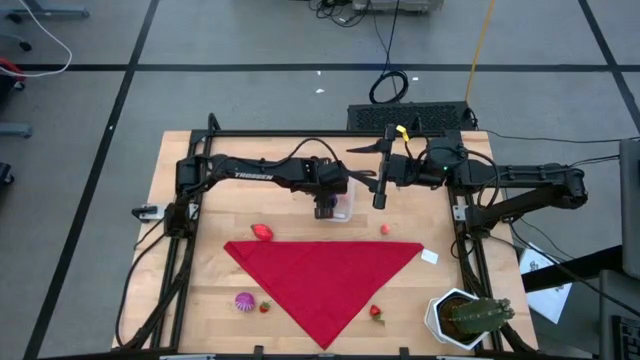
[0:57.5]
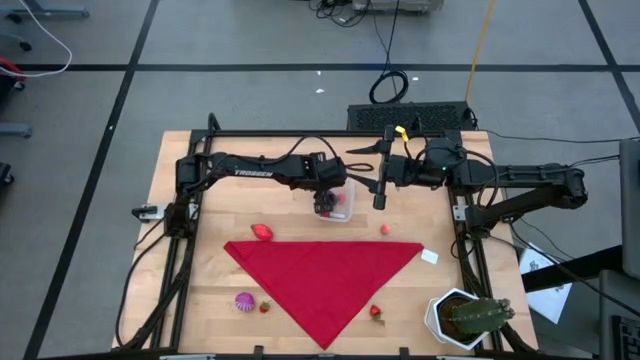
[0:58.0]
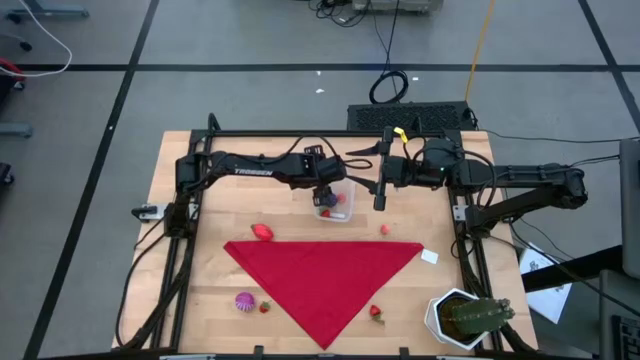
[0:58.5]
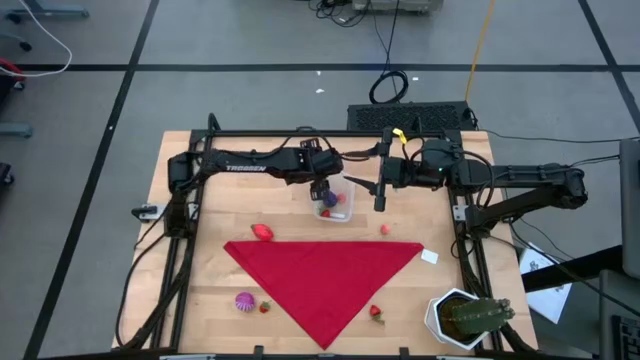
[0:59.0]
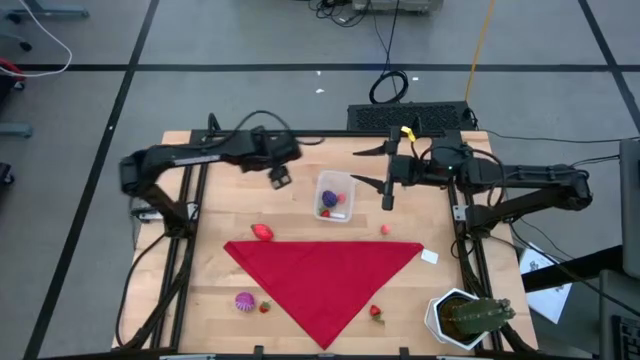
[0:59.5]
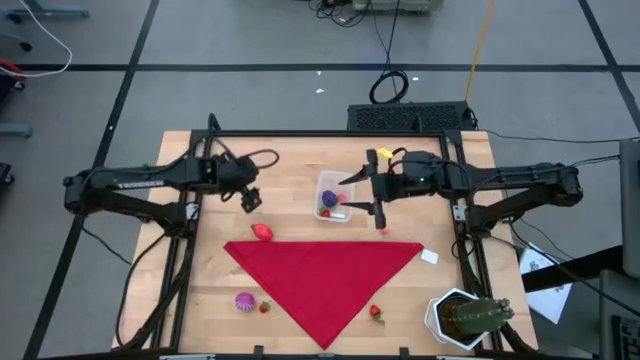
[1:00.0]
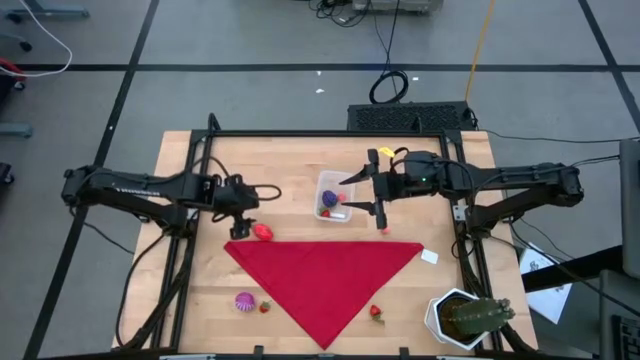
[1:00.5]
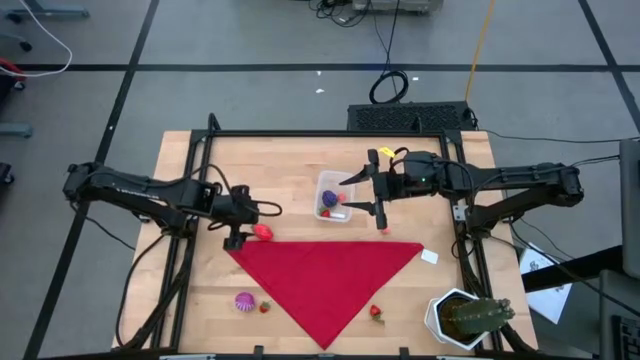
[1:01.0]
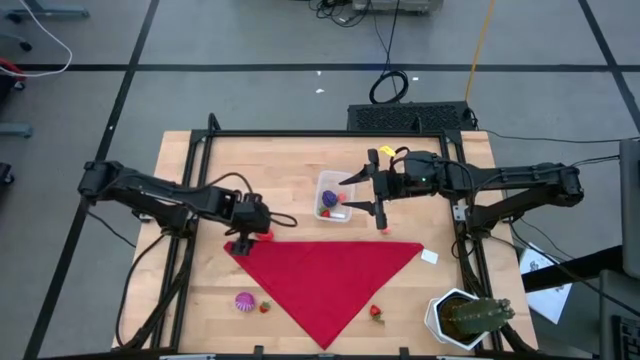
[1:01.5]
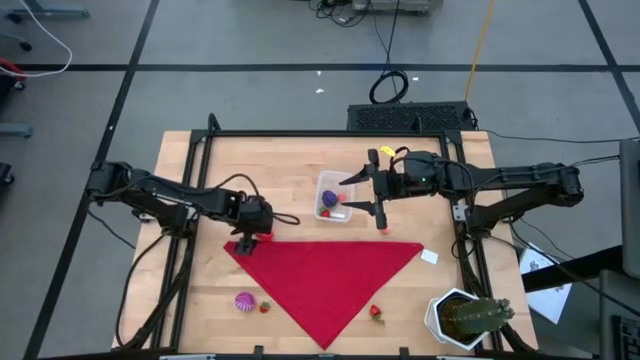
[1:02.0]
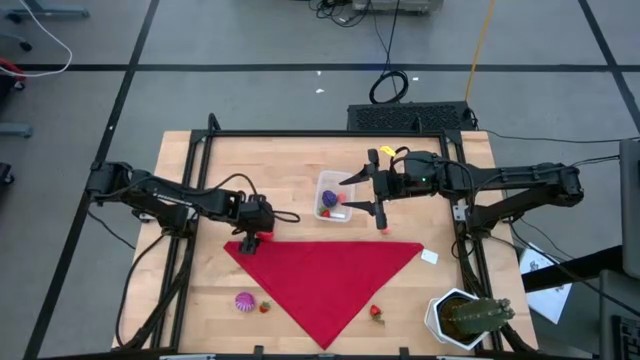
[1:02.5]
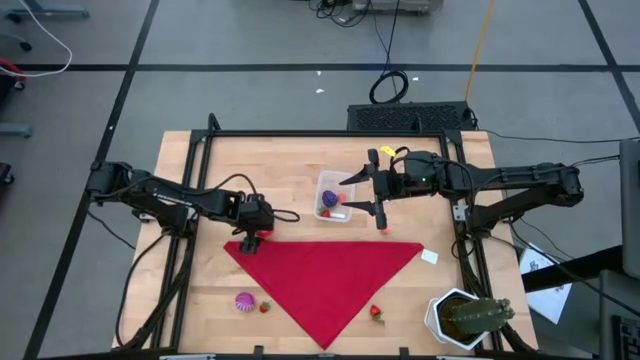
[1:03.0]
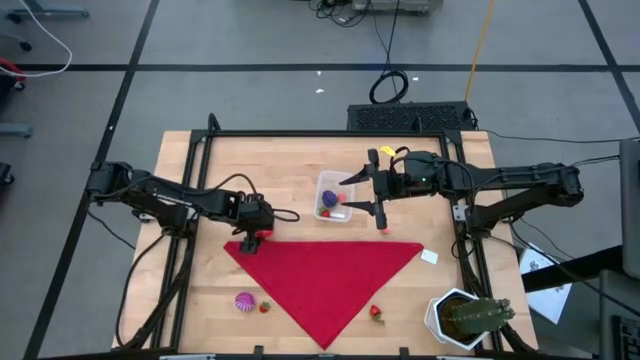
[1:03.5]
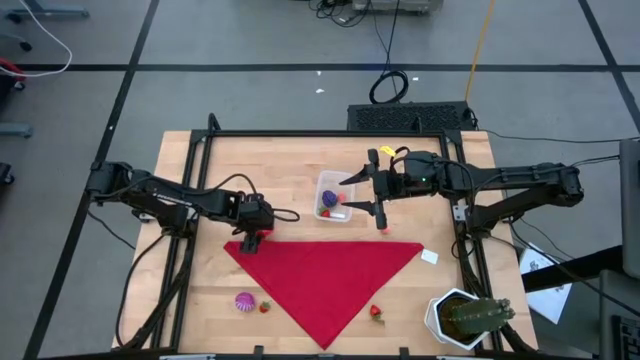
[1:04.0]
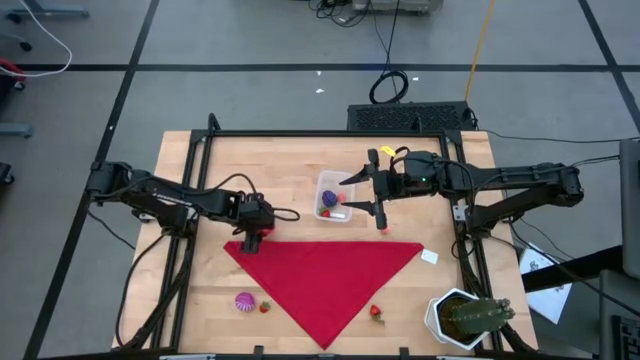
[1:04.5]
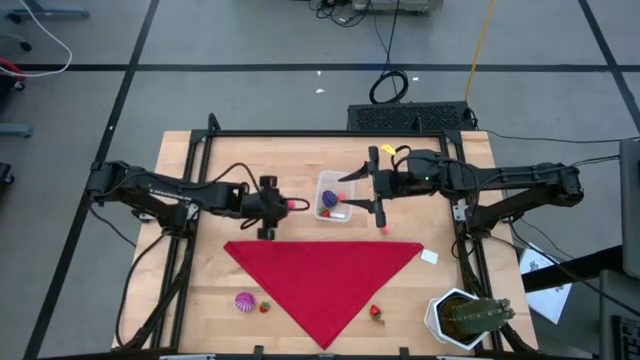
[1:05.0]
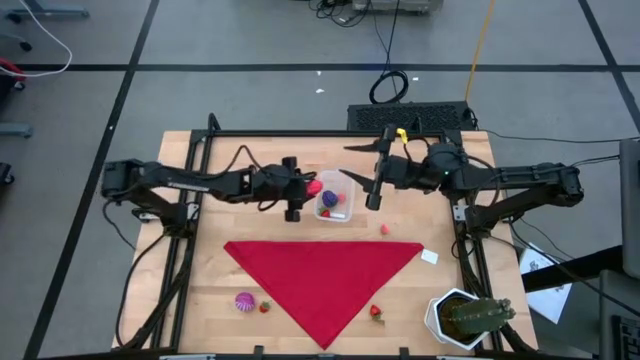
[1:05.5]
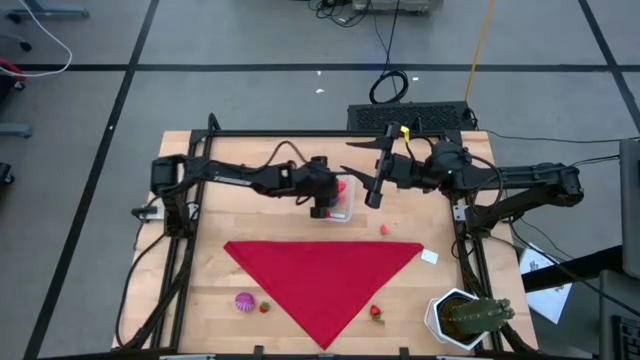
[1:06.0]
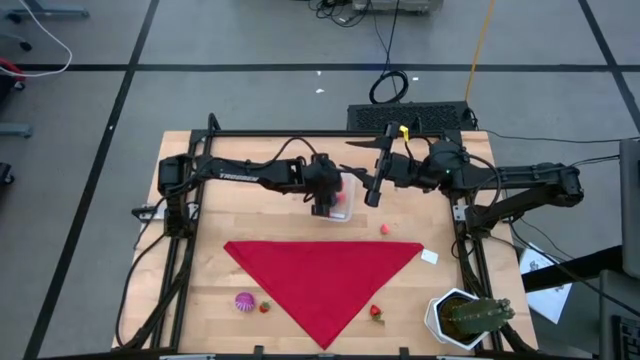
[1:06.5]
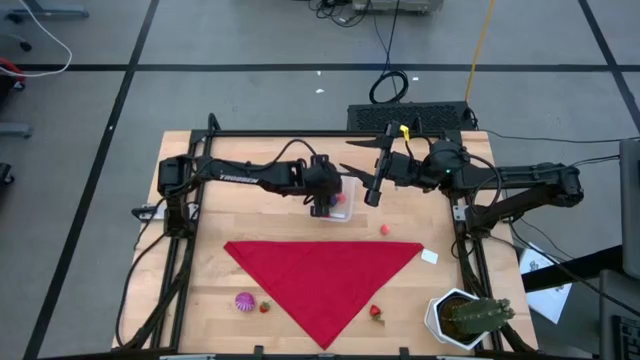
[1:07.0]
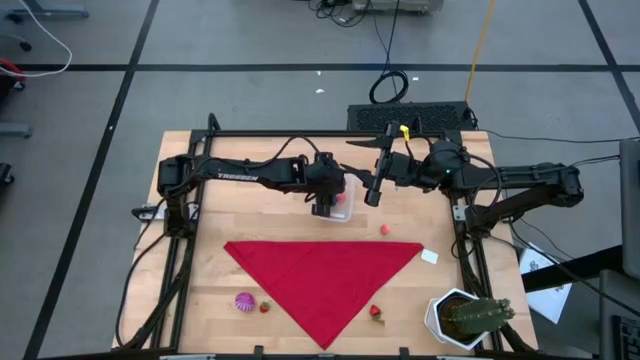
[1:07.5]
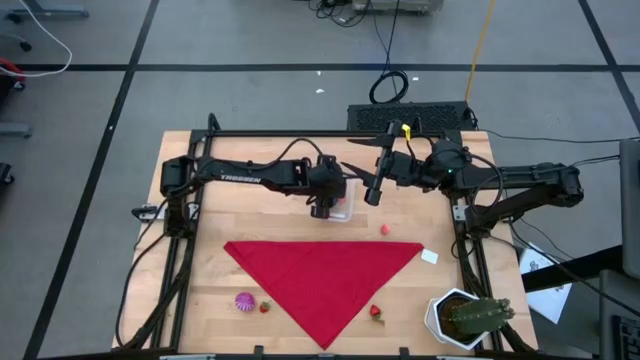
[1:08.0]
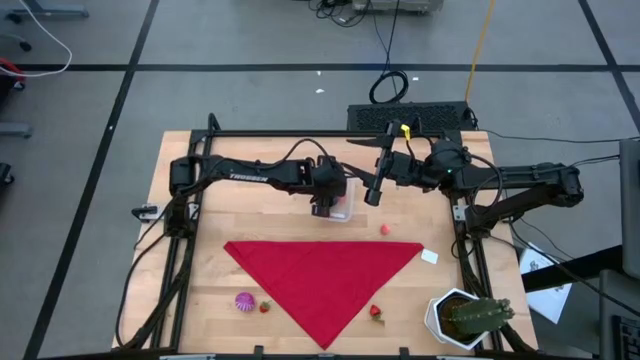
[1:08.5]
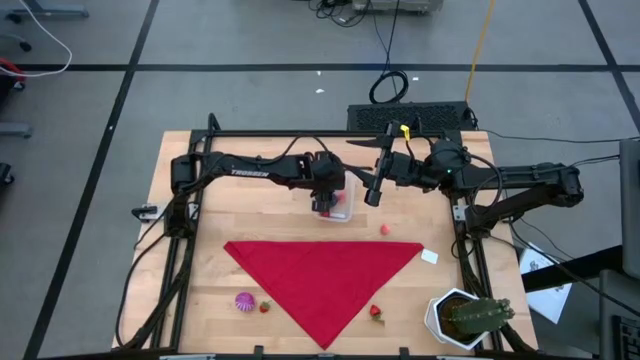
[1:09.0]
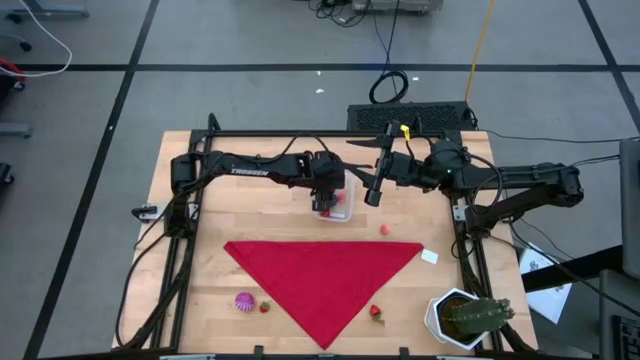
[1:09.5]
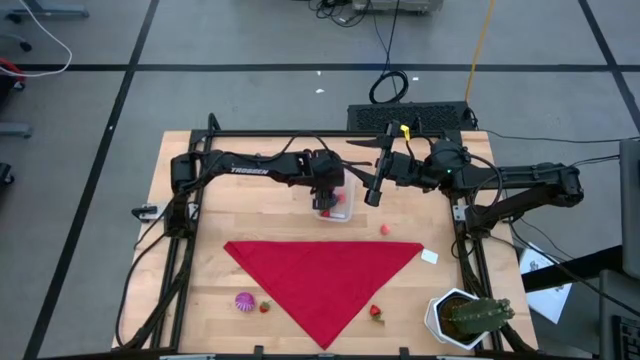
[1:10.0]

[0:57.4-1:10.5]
Task: Pick and placing Produce into tupperware
Put the red and green dragon fruit into the transparent bin

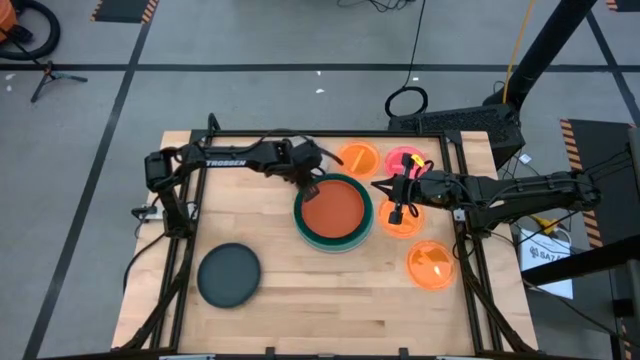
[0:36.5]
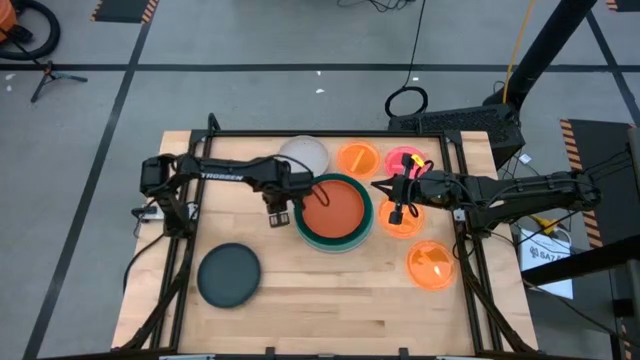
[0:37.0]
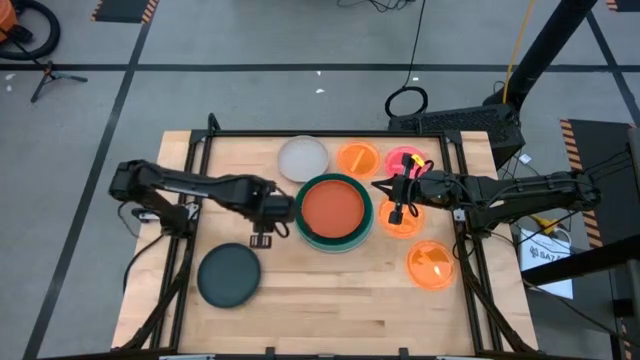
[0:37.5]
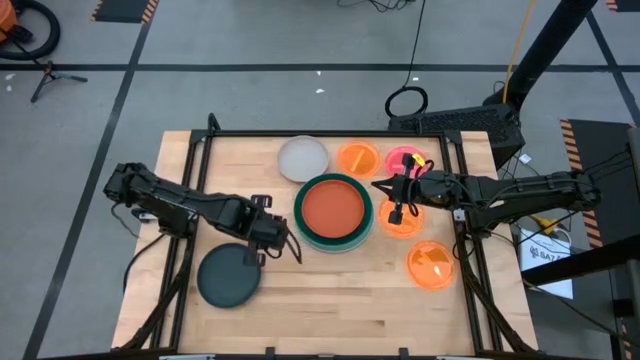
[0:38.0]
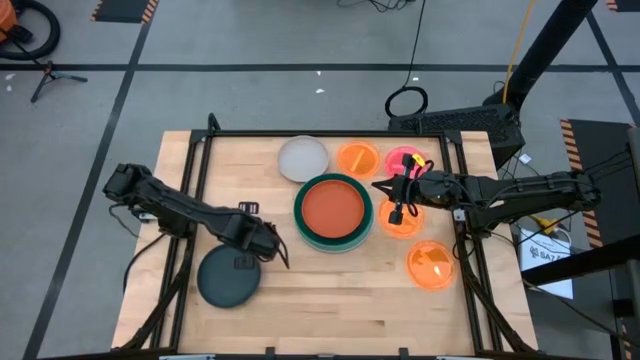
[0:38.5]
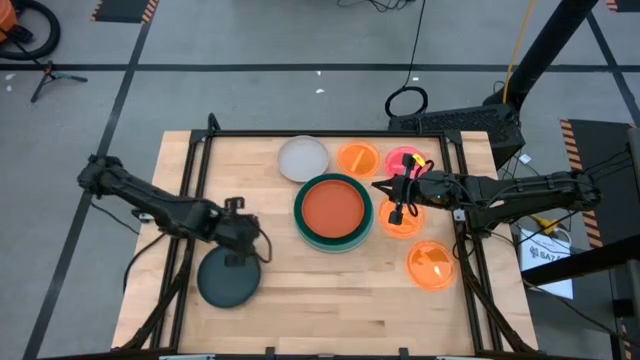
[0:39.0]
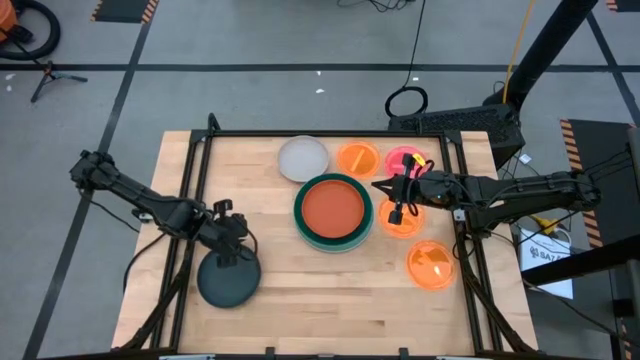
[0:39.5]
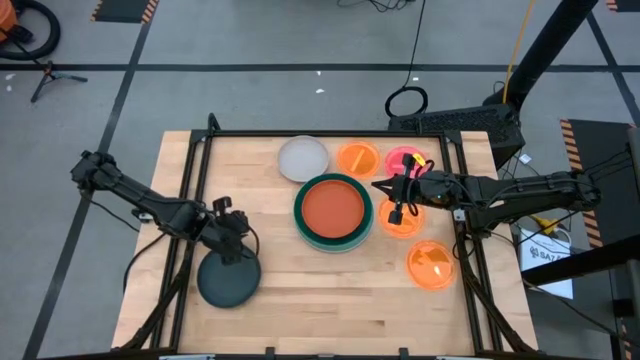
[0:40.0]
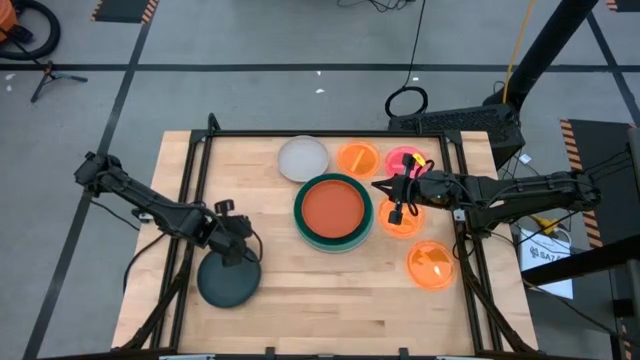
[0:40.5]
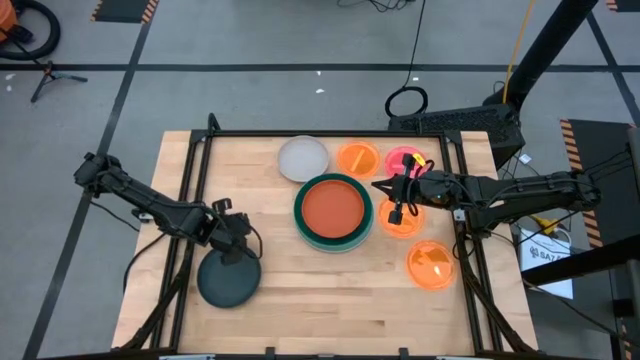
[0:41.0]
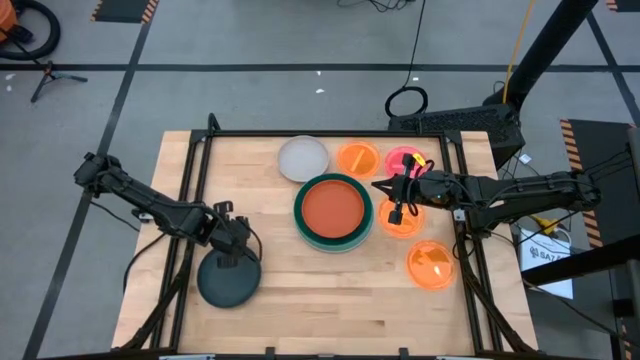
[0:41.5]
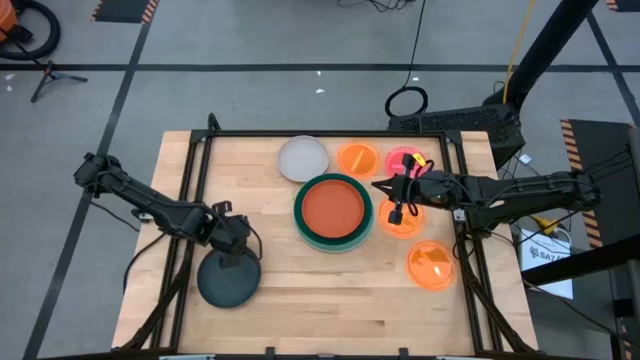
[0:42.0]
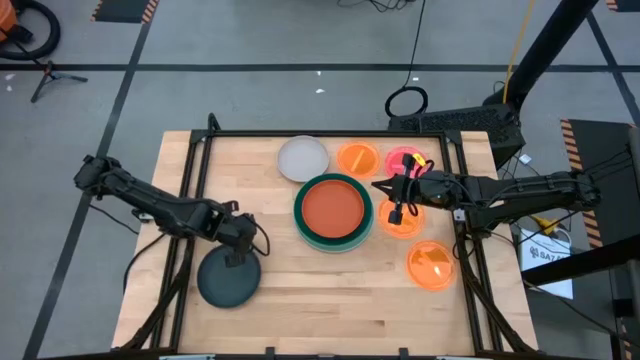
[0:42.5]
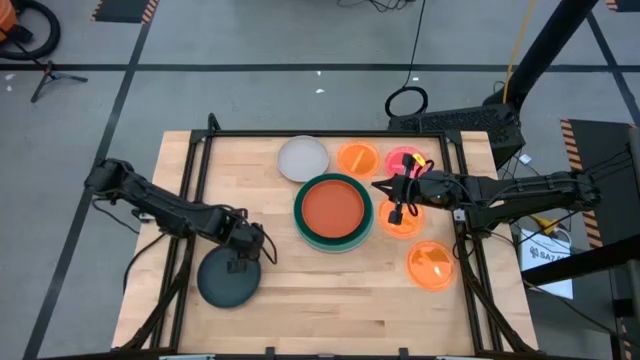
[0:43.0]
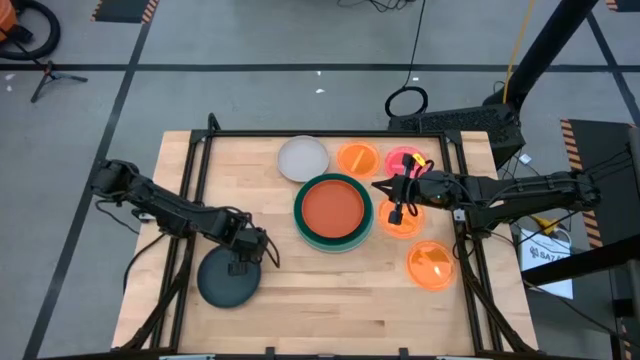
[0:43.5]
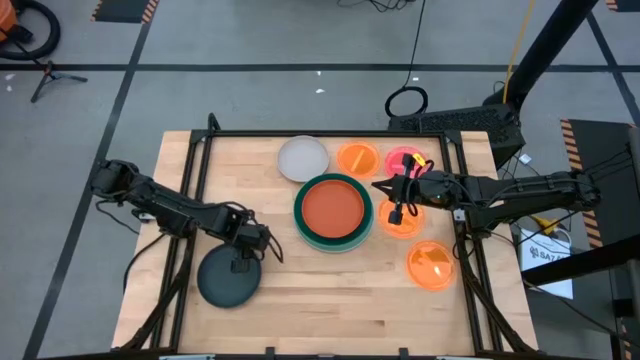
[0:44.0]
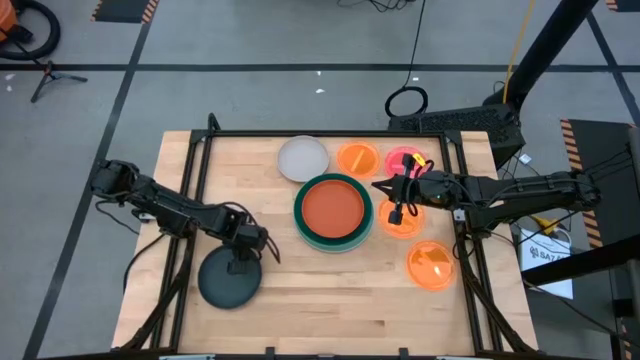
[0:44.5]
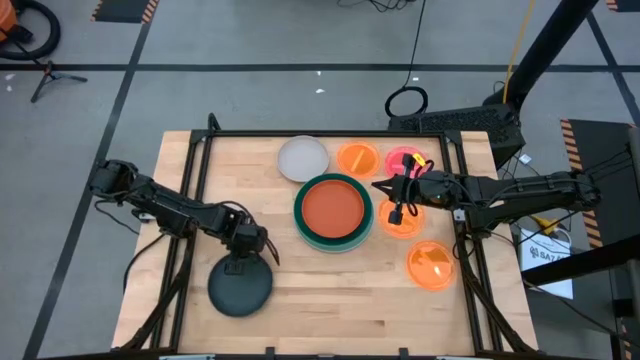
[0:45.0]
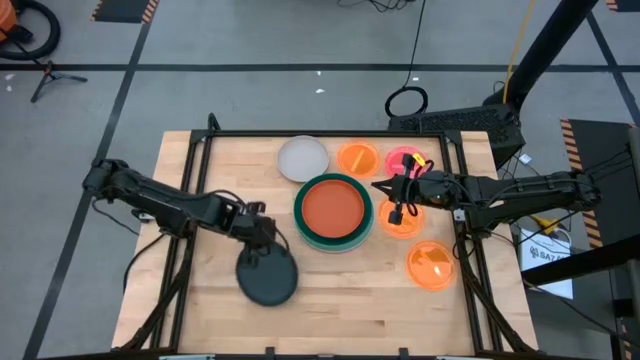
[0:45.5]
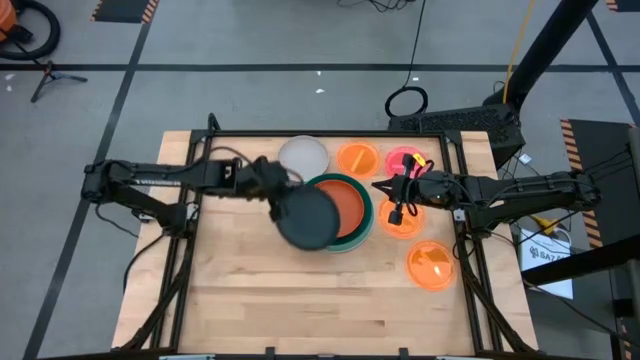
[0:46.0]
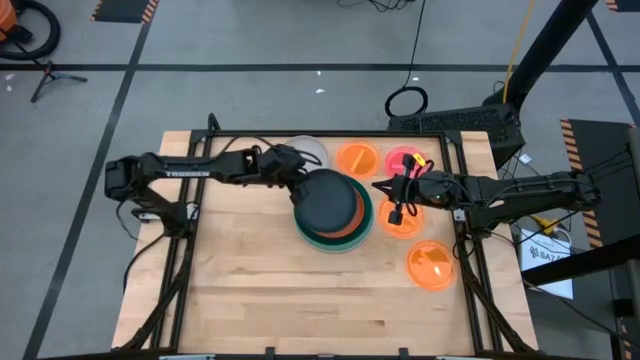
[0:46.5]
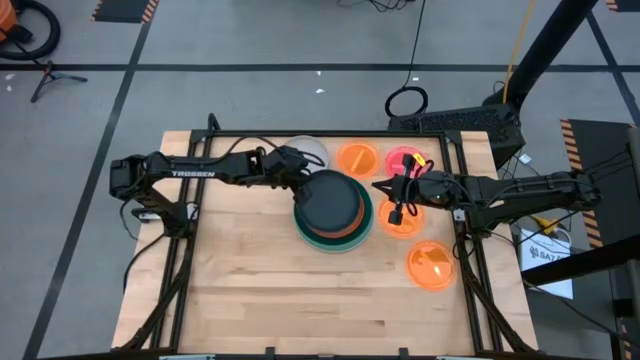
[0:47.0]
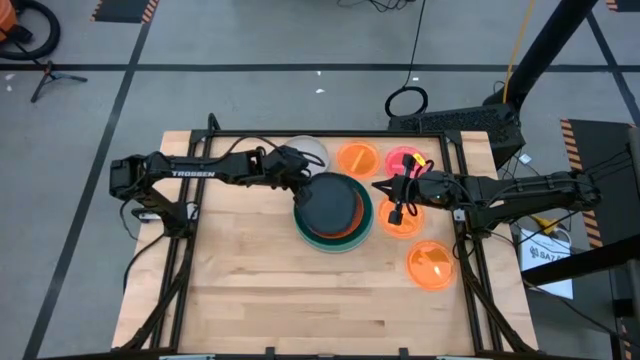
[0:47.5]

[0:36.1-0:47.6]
Task: Stack plastic plates
Stack the black plate on top of the orange plate
